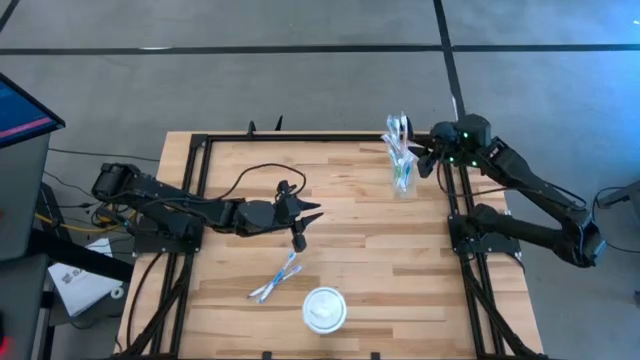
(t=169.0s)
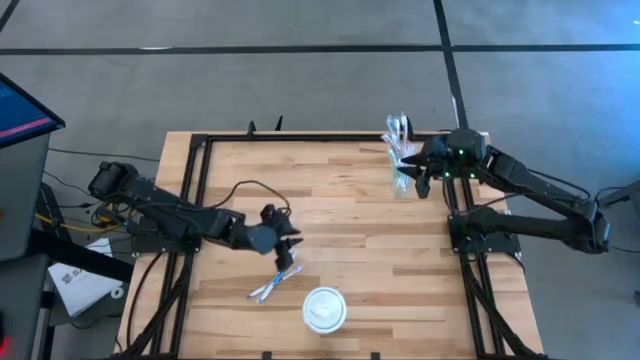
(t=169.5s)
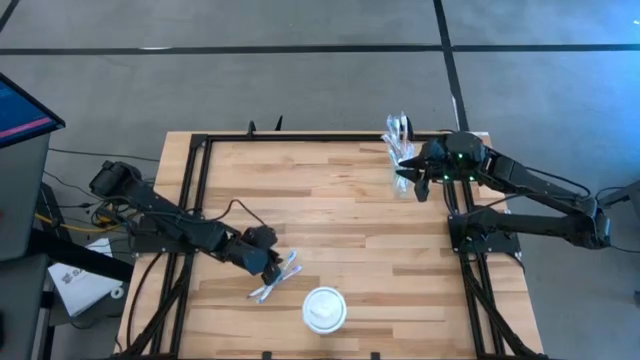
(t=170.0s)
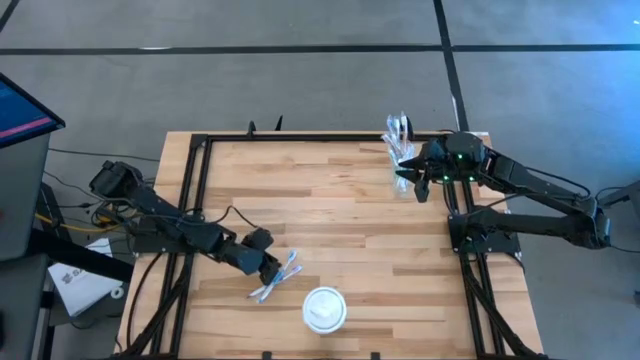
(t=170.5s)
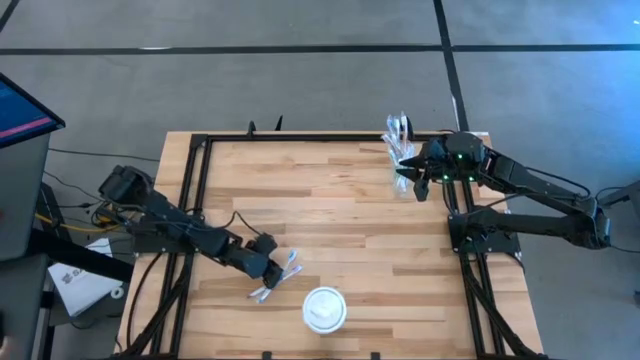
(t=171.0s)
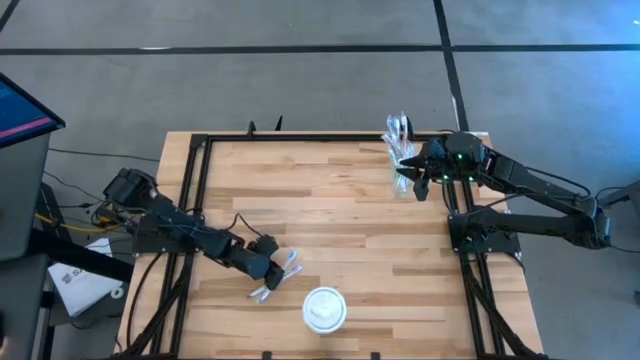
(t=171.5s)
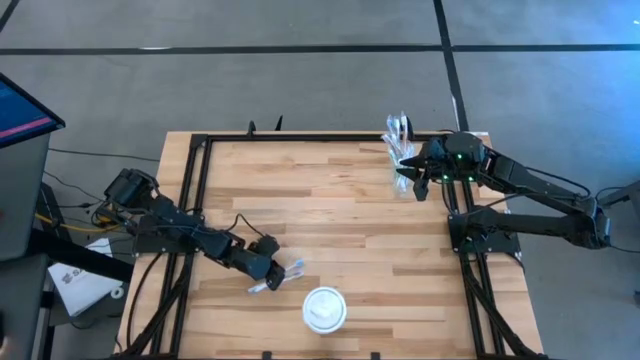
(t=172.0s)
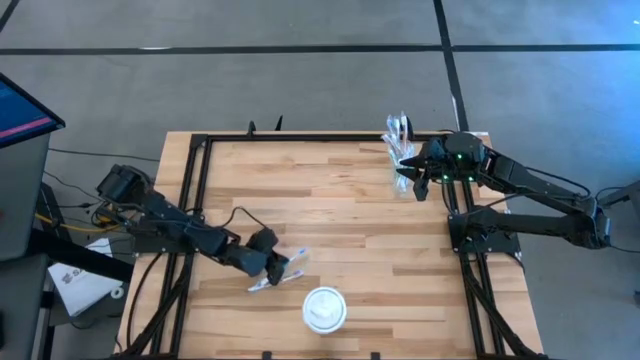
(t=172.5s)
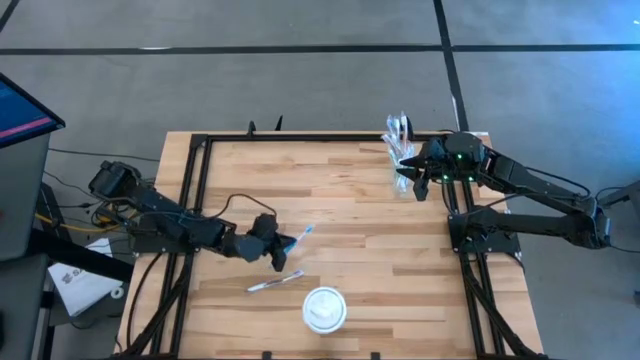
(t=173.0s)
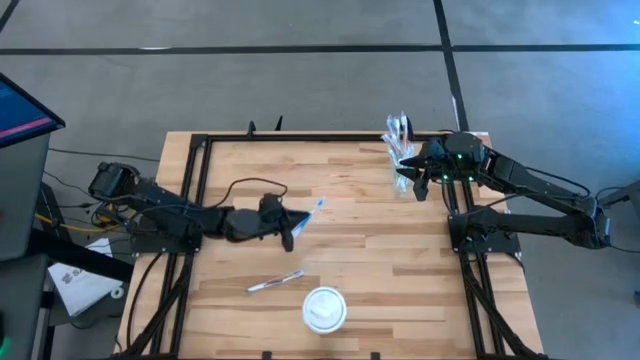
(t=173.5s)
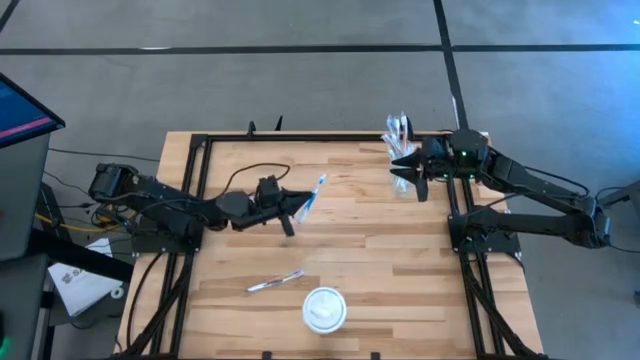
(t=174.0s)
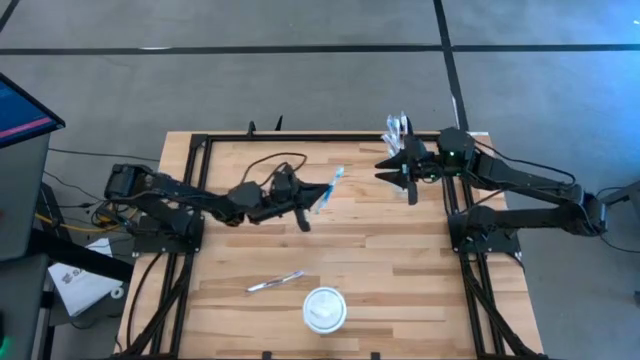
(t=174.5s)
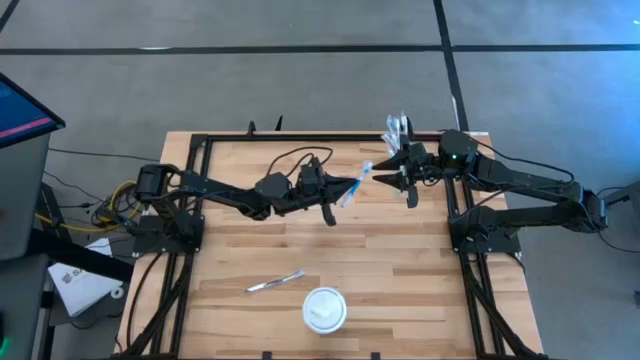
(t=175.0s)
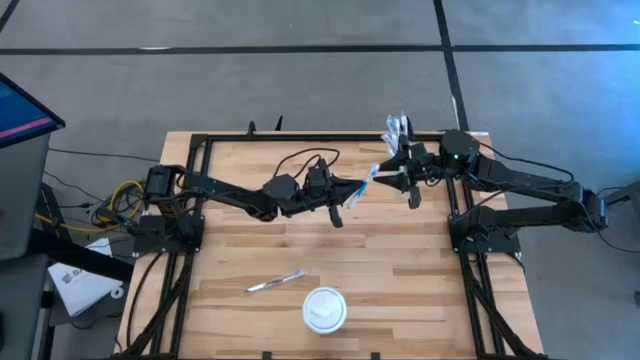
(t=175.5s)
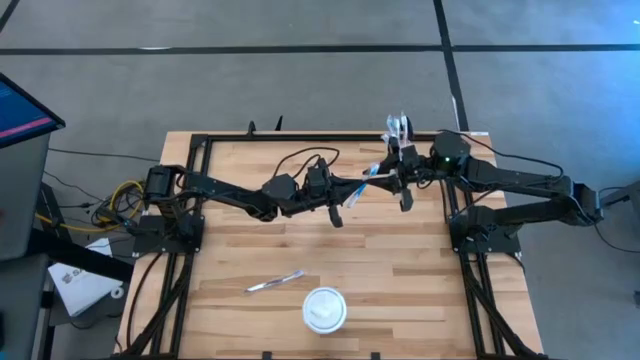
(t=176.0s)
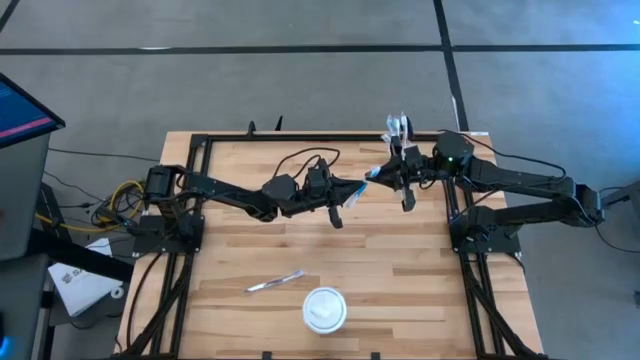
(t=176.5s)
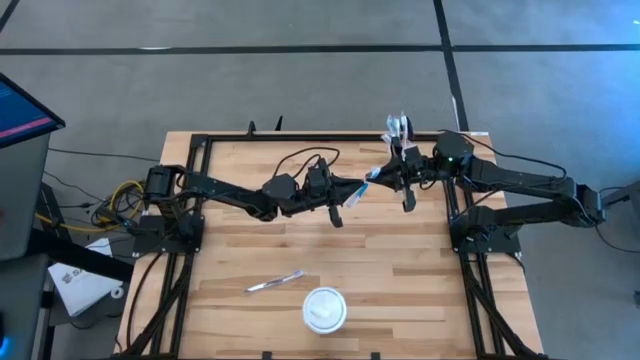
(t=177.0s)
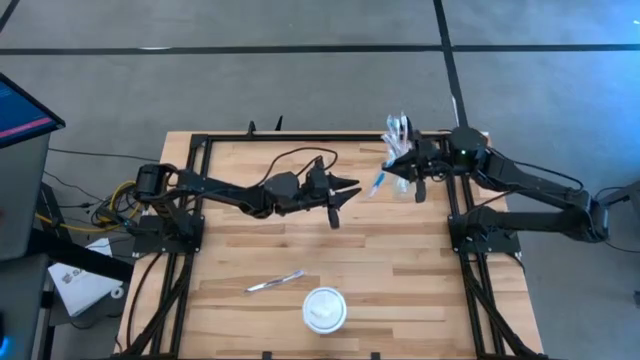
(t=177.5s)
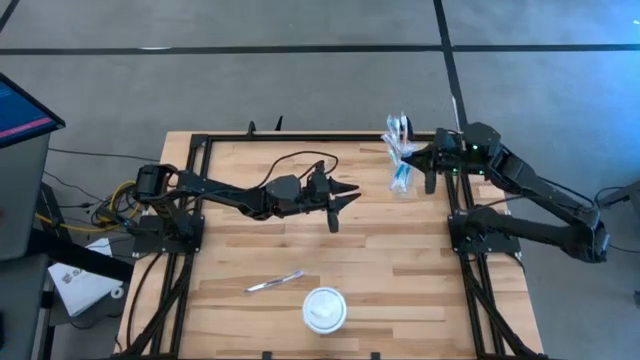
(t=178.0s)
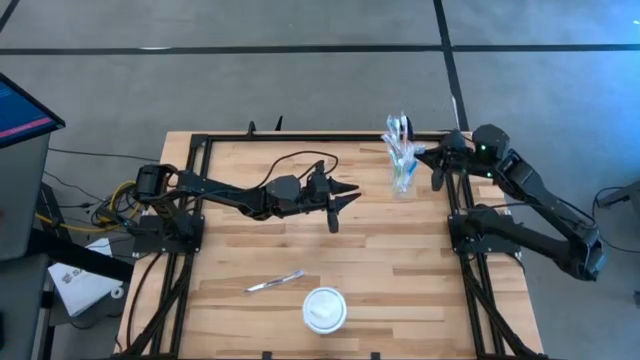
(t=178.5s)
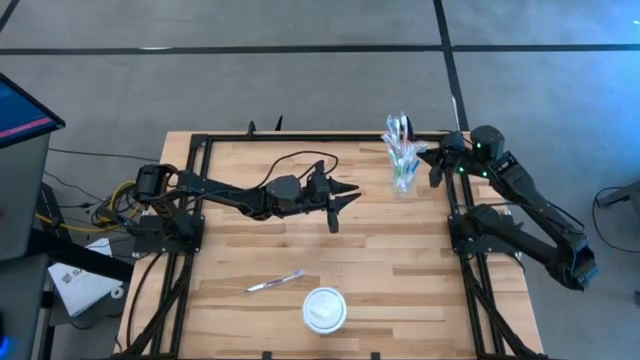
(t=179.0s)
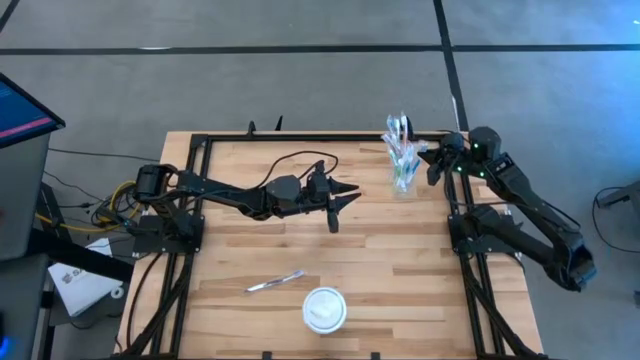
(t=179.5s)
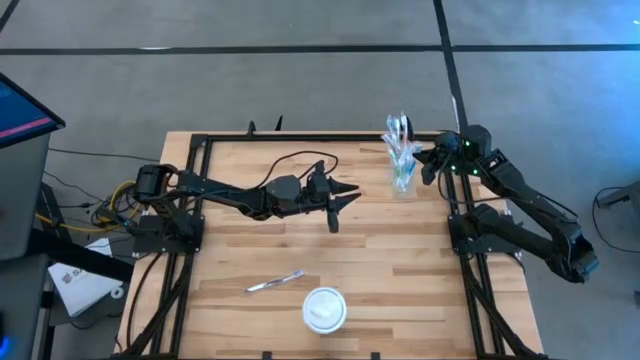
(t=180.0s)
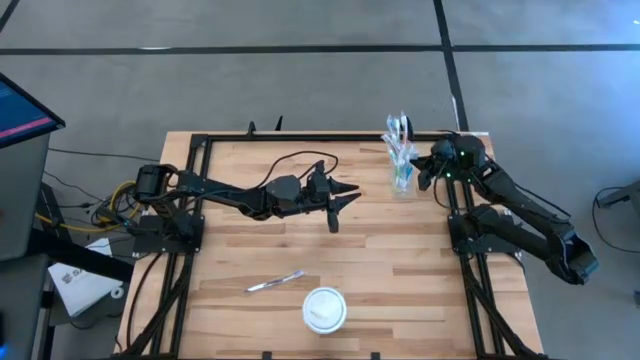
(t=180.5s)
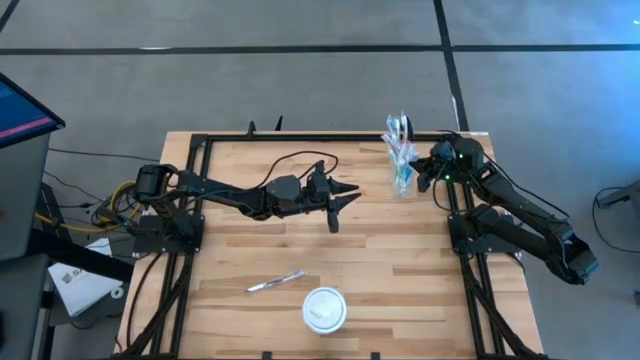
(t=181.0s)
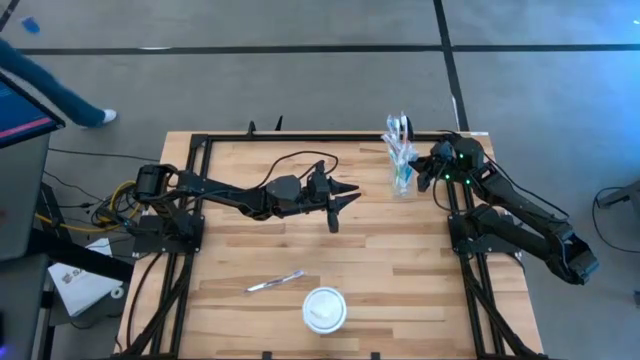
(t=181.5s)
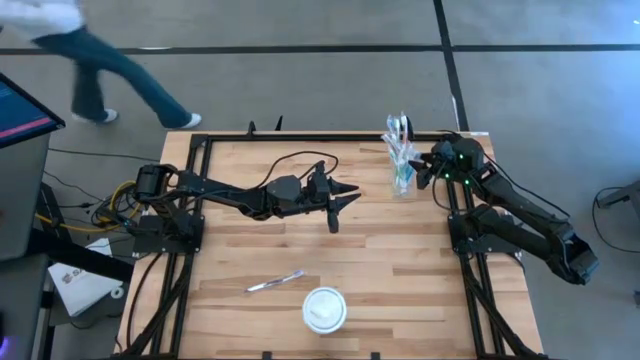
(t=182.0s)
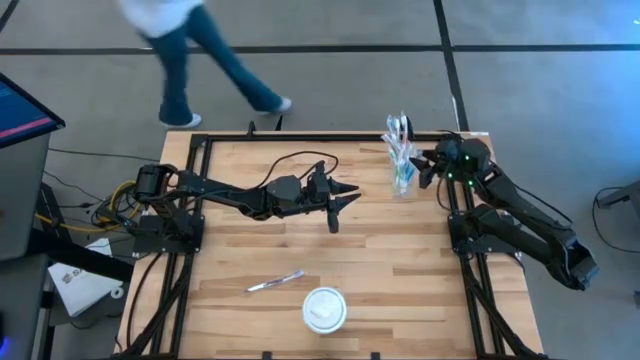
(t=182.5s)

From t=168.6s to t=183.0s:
Task: Pick & Place toothbrushing station
Put the blue toothbrush into the transparent organizer

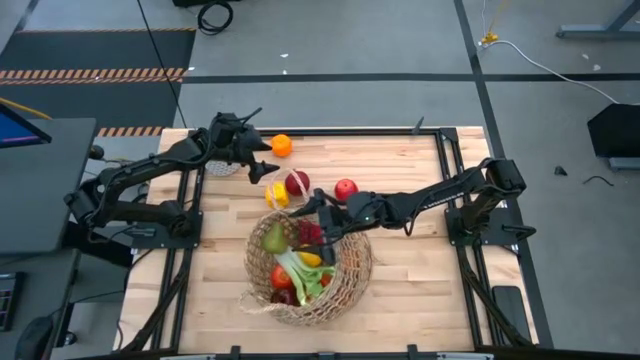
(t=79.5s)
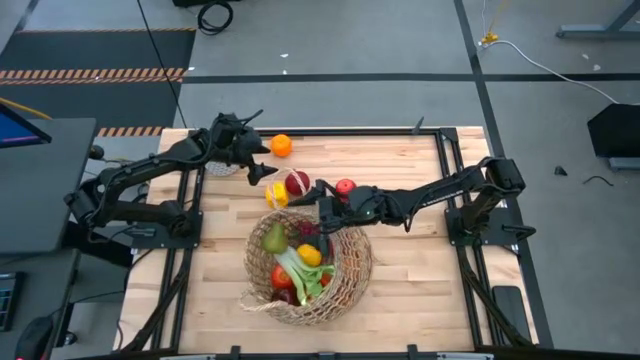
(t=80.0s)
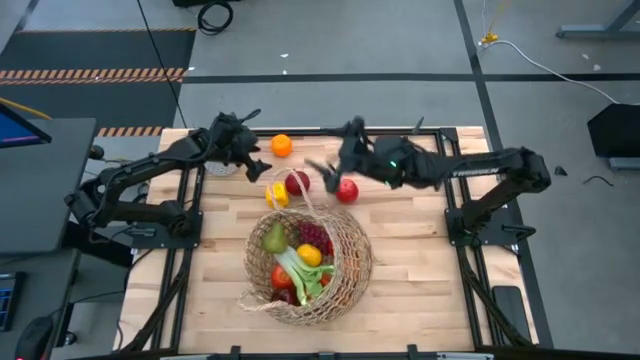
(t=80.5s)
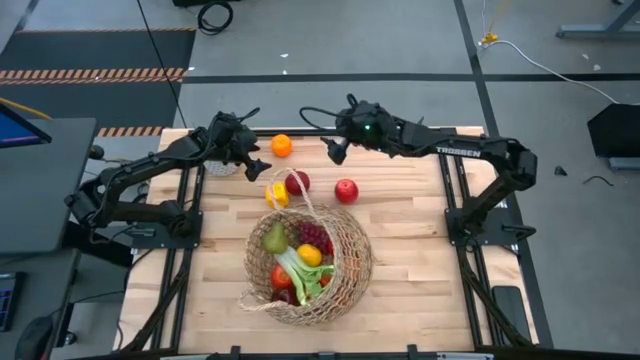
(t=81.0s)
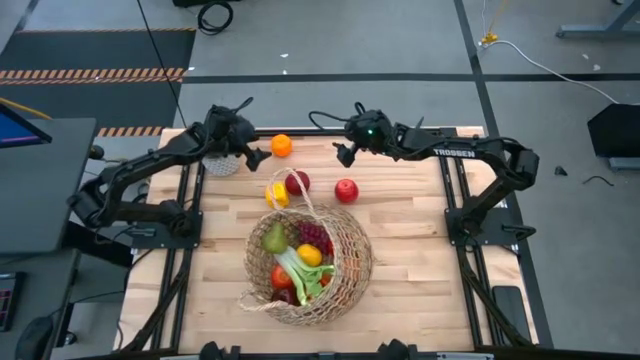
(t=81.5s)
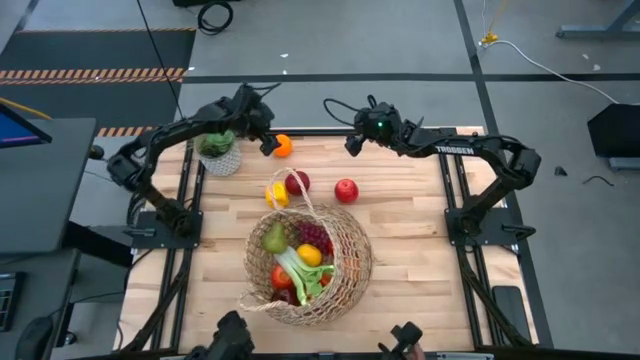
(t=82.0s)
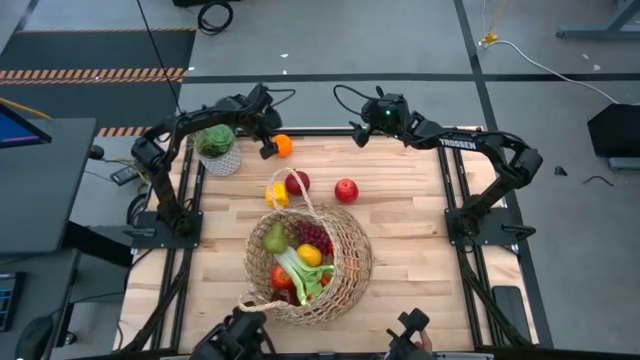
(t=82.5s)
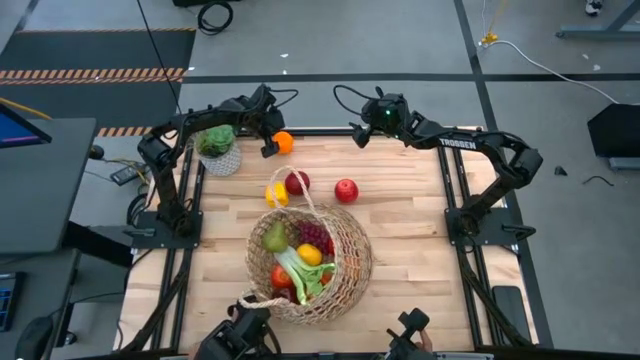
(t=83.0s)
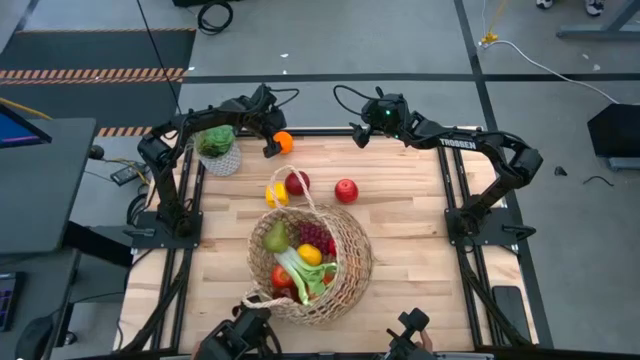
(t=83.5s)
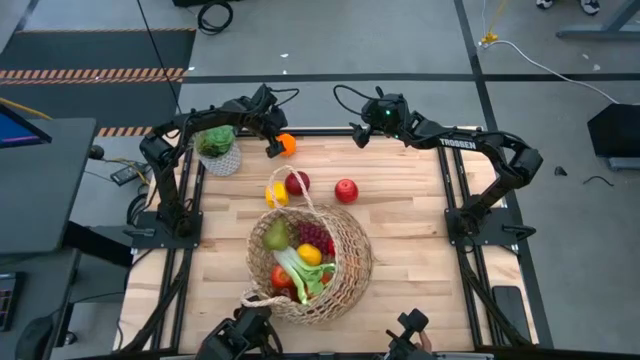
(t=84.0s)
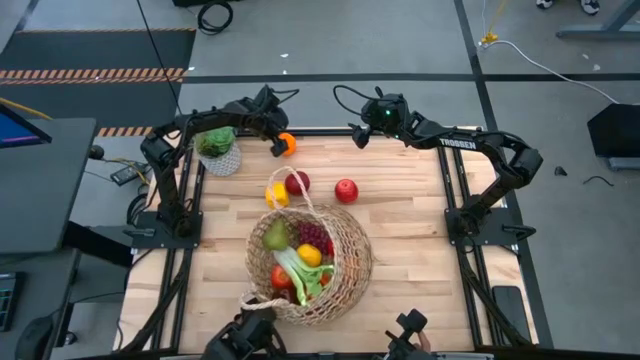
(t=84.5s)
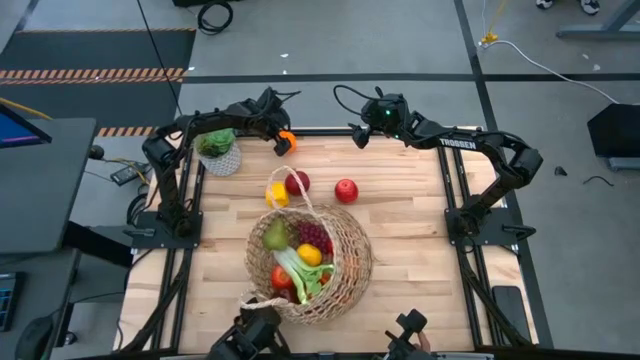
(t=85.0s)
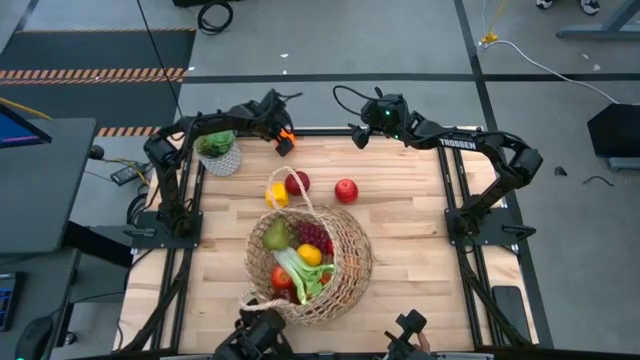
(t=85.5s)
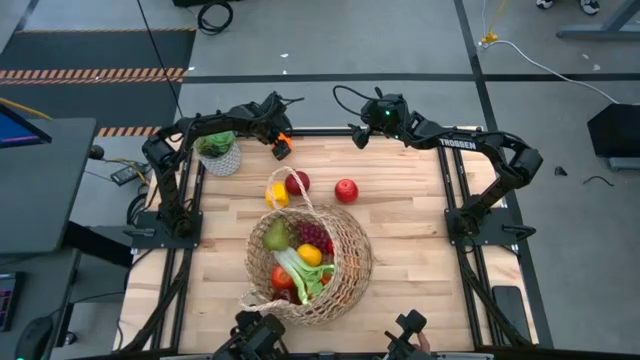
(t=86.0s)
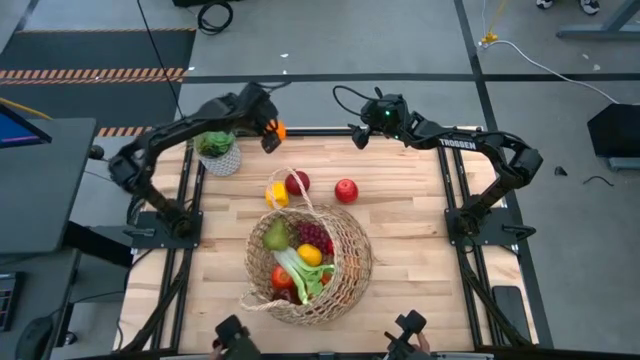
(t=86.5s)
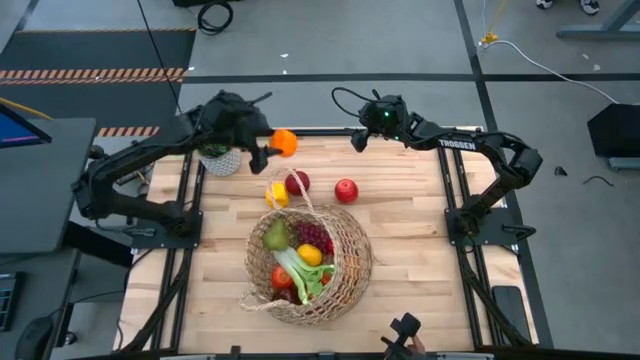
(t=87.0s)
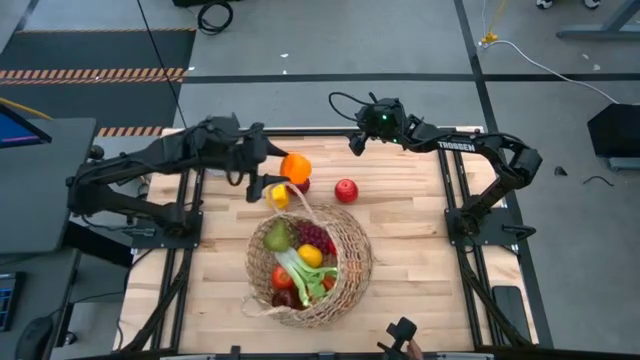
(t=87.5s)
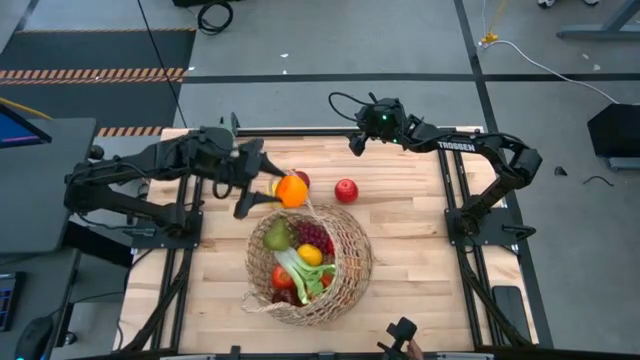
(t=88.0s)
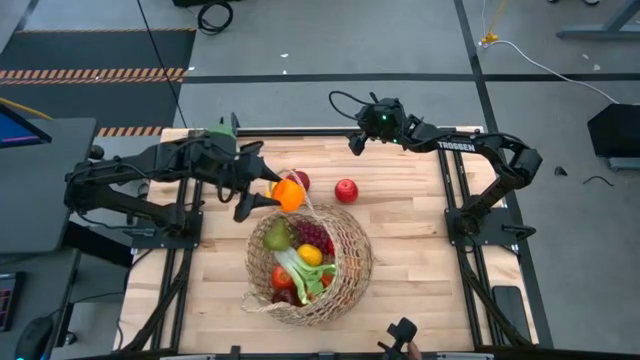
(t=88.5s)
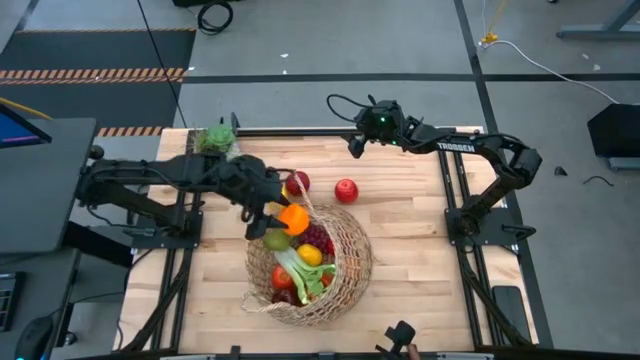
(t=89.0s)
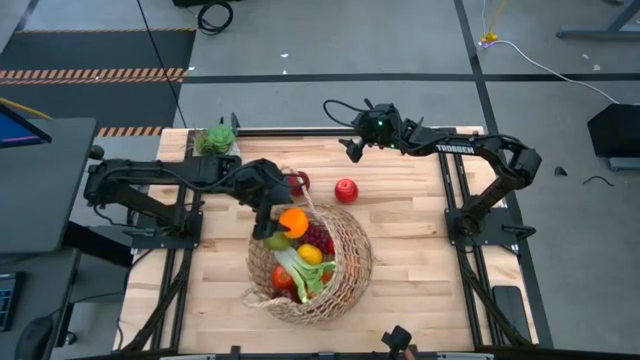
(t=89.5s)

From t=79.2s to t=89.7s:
Task: Build produce basket
Put the orange into the basket
